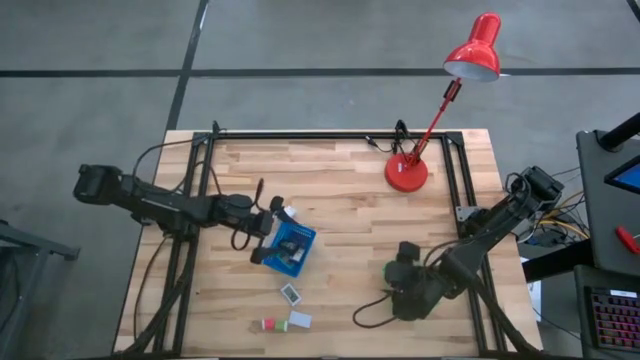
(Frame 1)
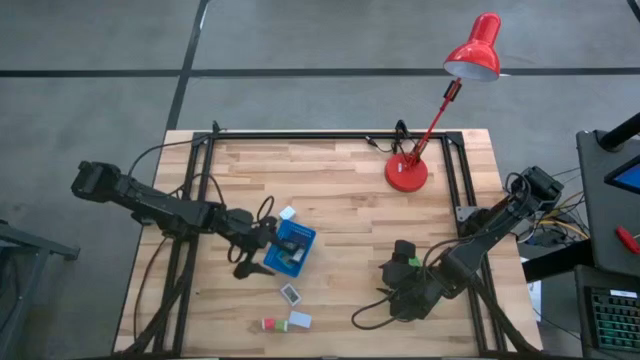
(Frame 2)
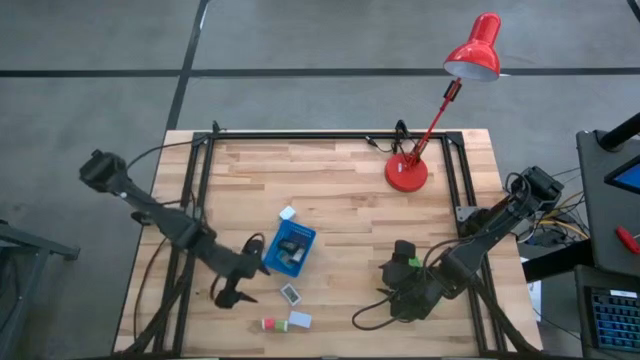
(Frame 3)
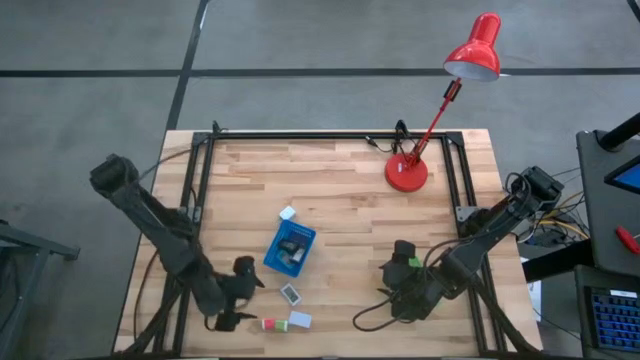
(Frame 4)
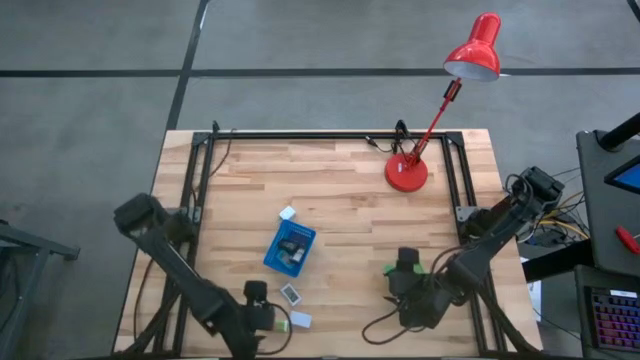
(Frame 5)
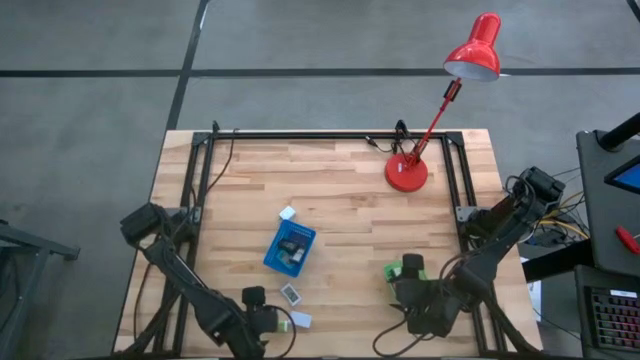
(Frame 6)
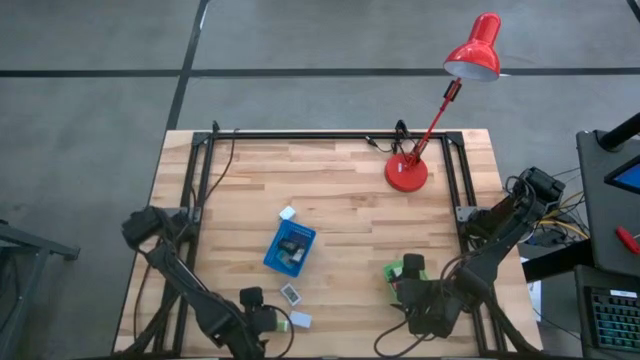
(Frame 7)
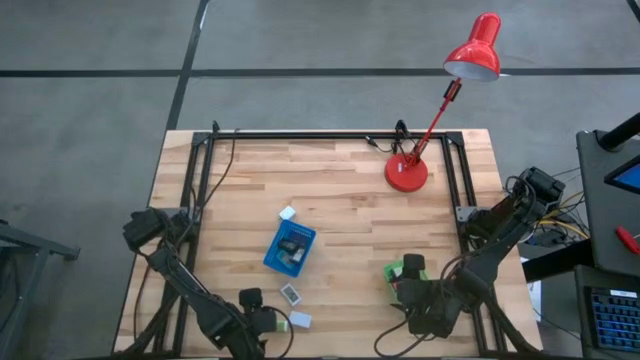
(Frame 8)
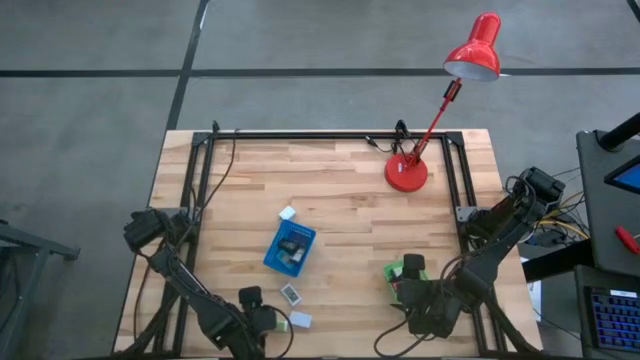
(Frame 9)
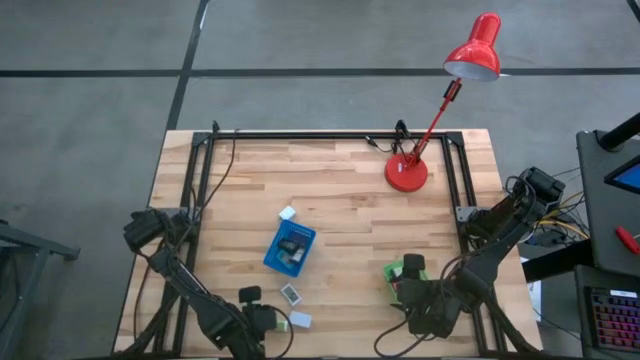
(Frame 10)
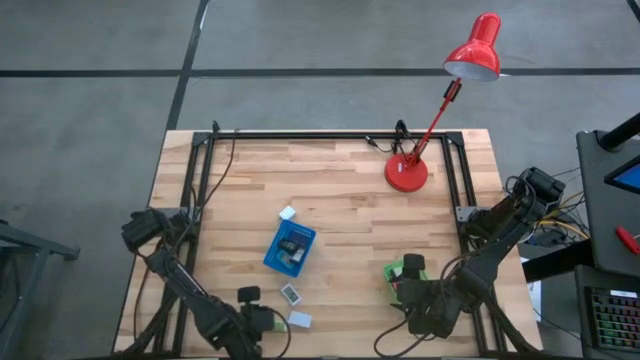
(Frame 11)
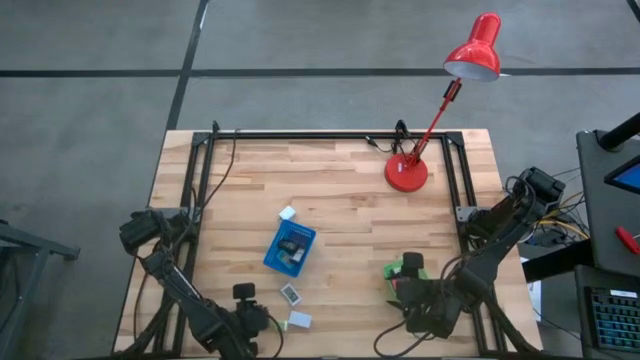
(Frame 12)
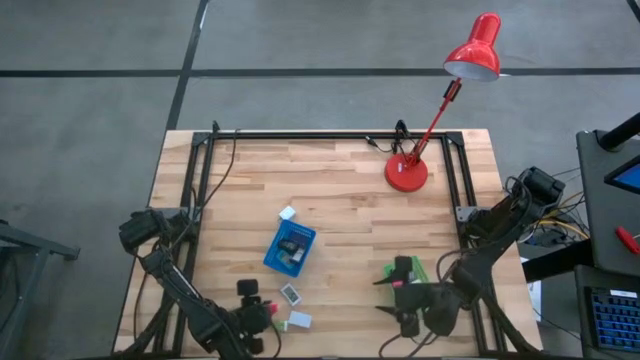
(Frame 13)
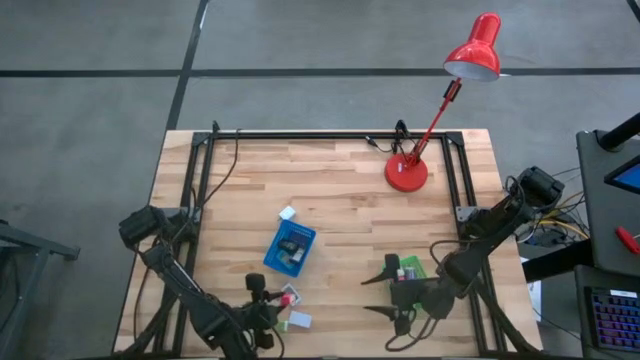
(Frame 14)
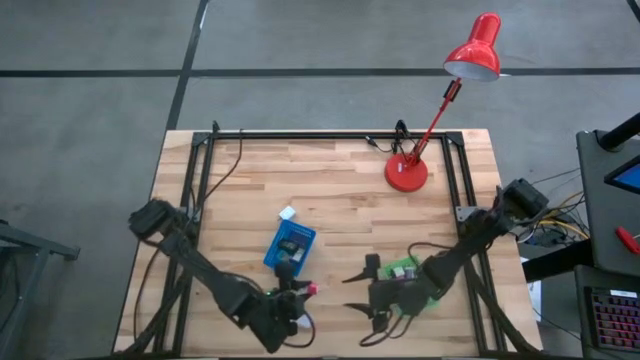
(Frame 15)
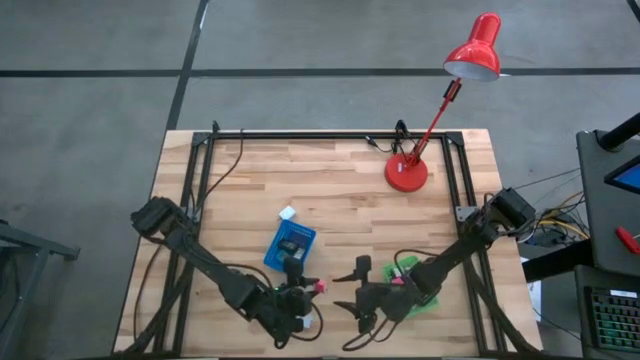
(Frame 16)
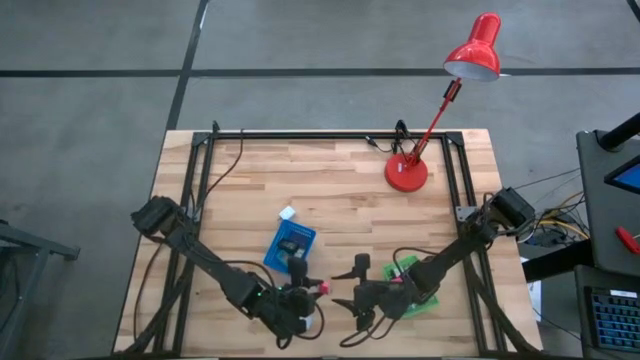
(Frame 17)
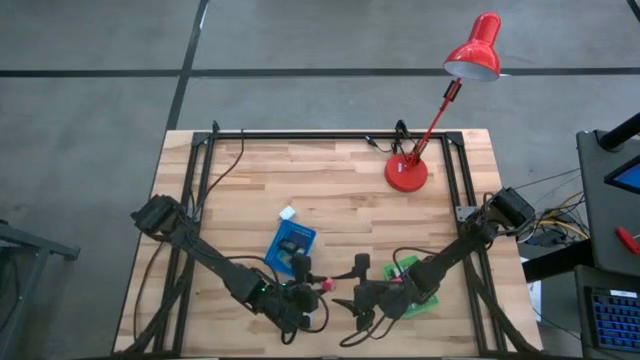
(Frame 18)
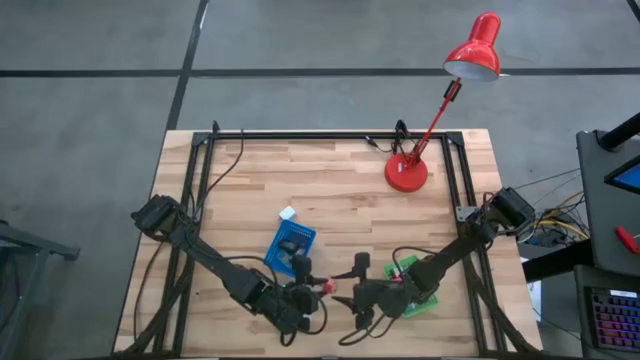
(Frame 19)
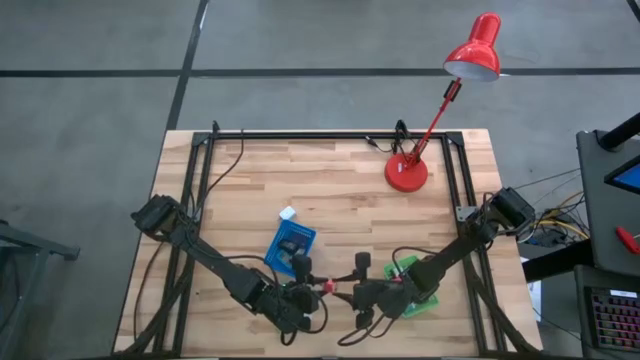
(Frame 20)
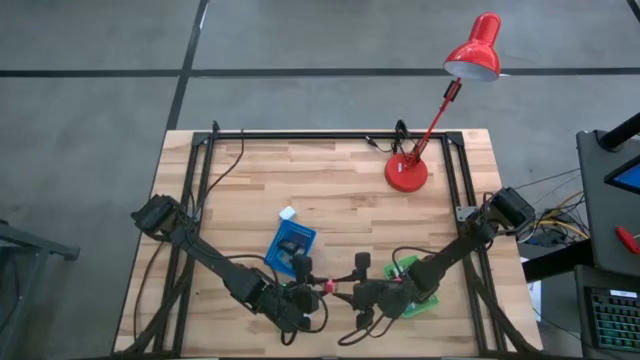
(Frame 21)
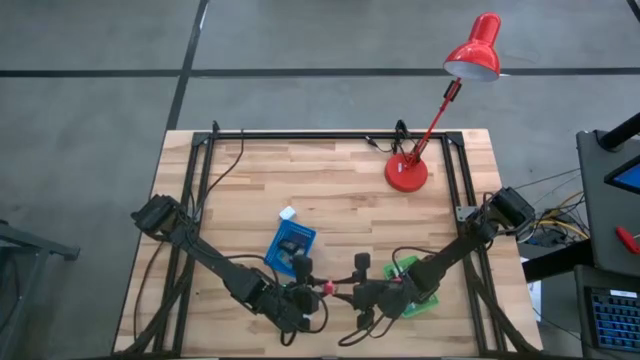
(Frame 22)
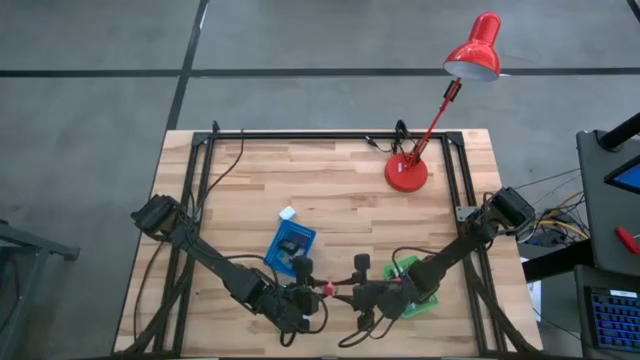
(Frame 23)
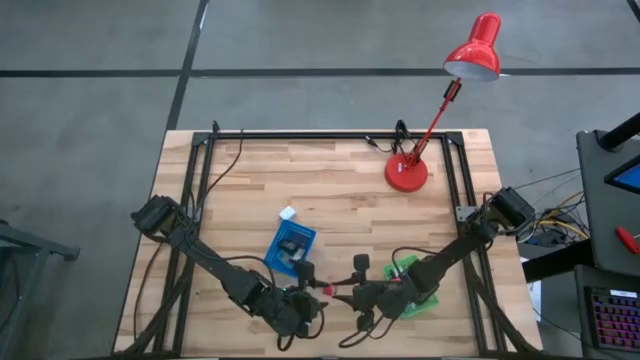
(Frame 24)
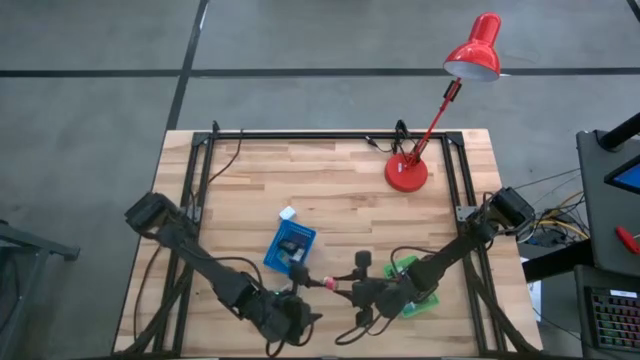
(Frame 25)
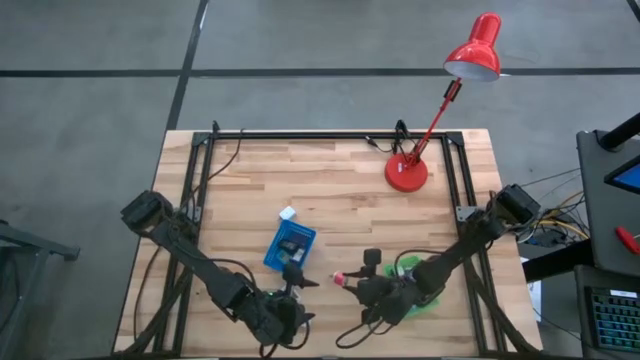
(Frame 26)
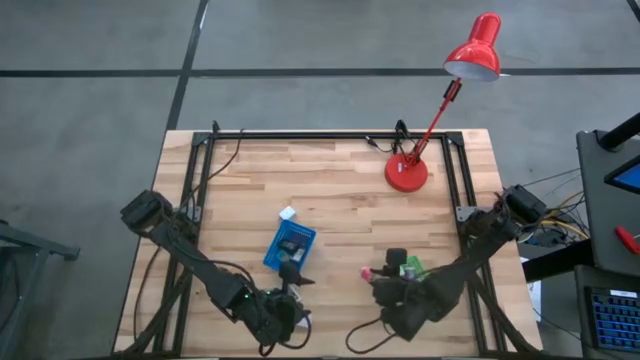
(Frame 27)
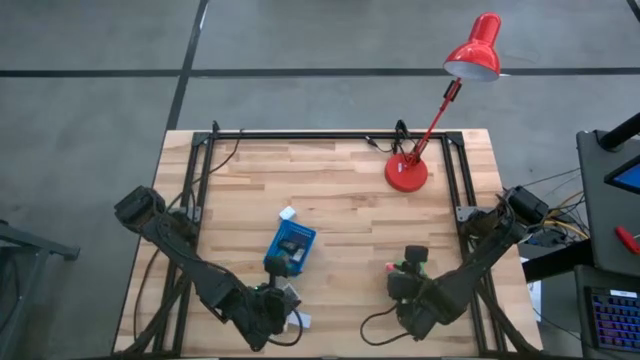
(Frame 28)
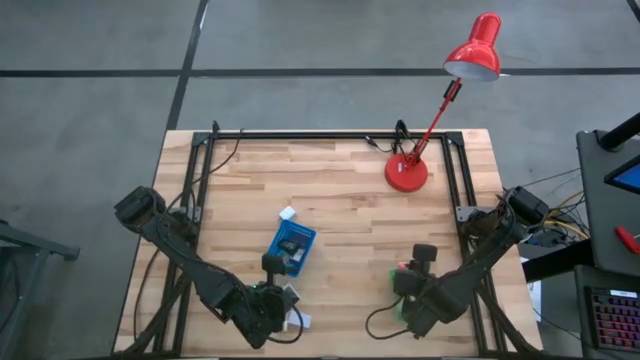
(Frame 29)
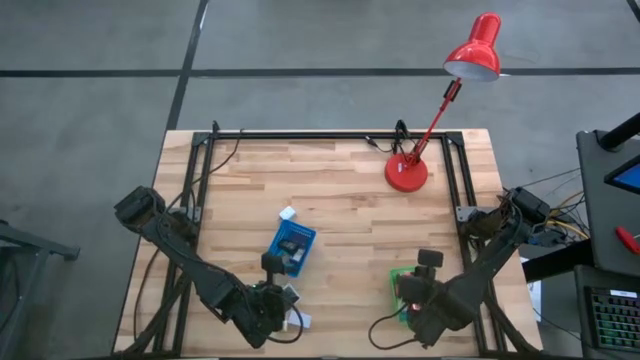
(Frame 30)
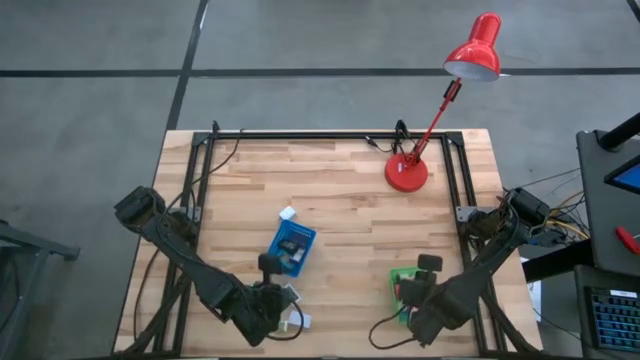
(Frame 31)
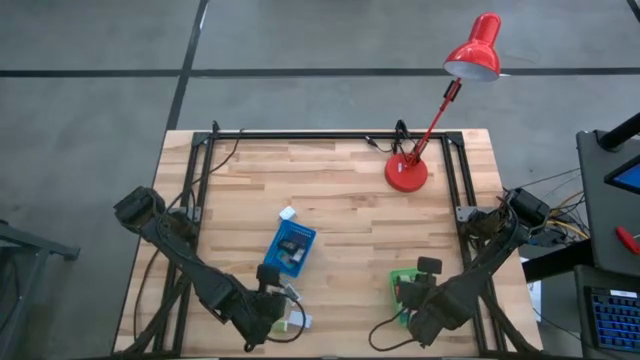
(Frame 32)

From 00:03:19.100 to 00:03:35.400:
Task: Pick & Place Office items
Put the pink white charger adapter into the green bin

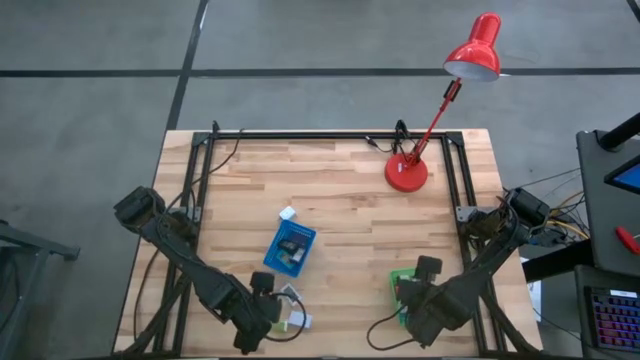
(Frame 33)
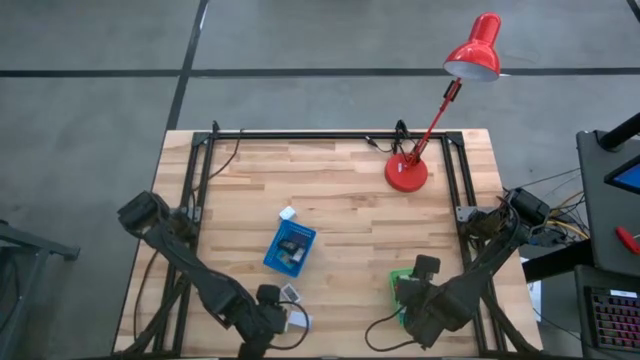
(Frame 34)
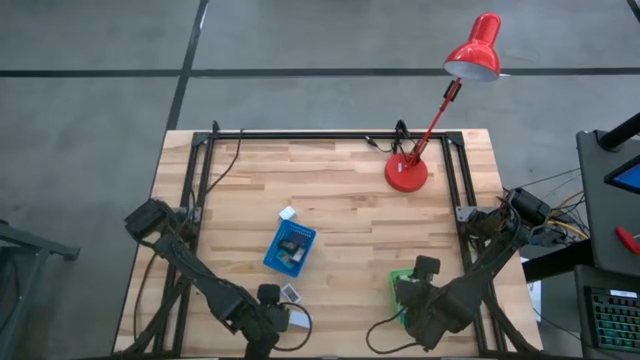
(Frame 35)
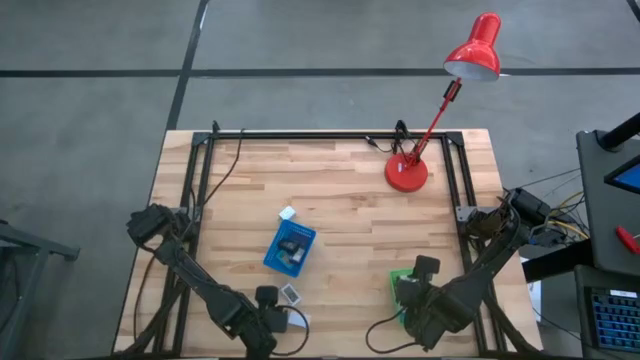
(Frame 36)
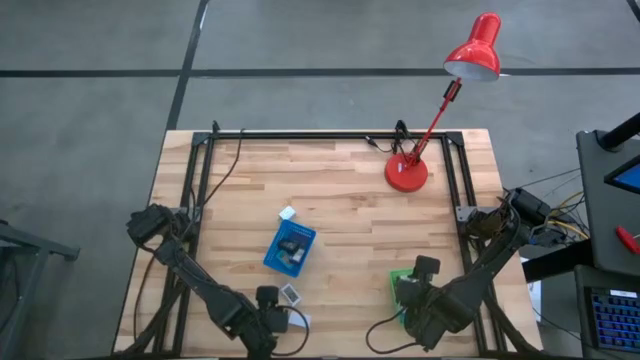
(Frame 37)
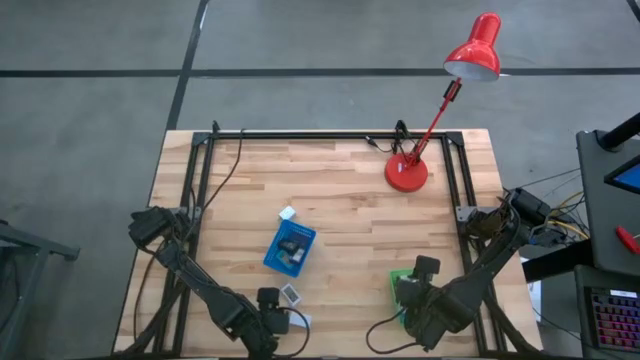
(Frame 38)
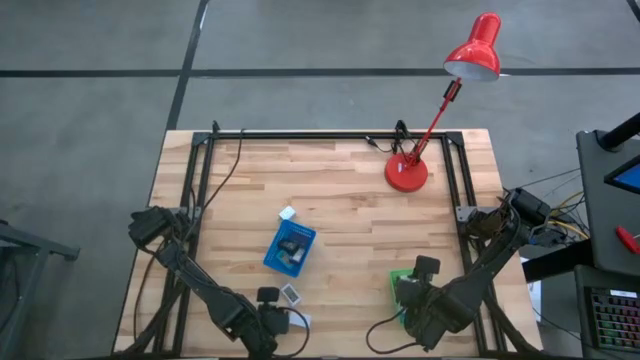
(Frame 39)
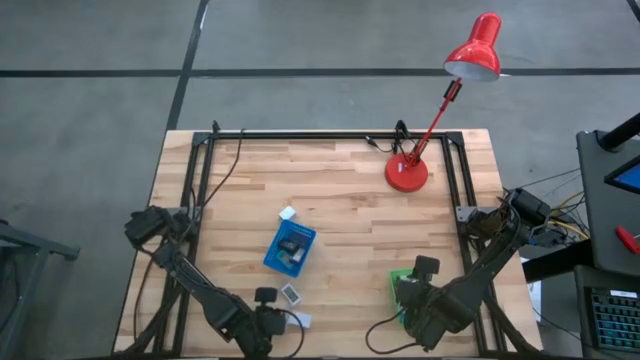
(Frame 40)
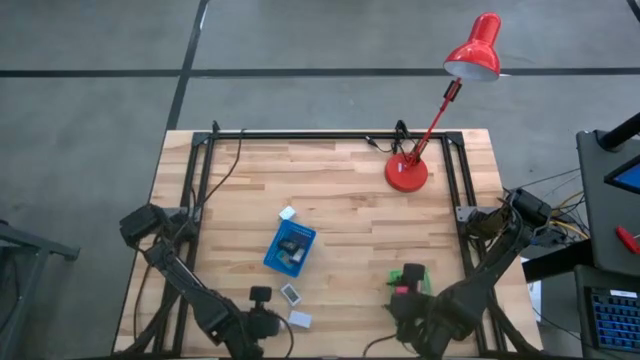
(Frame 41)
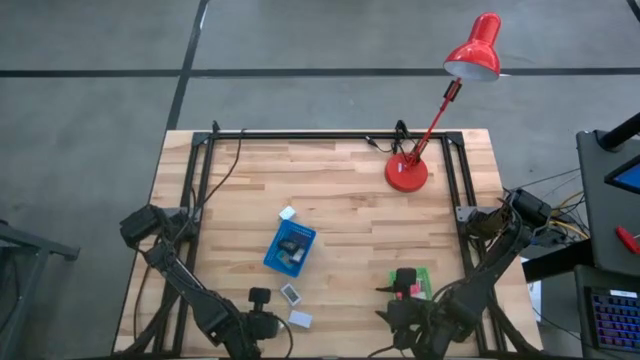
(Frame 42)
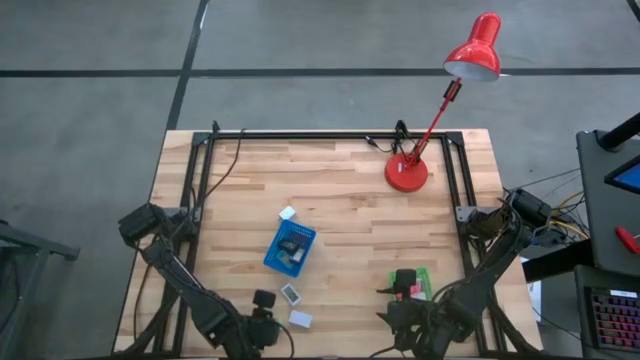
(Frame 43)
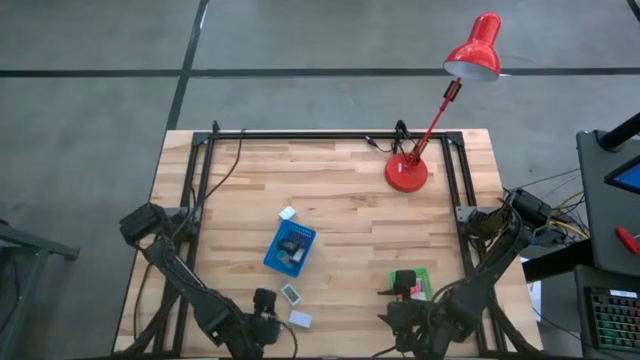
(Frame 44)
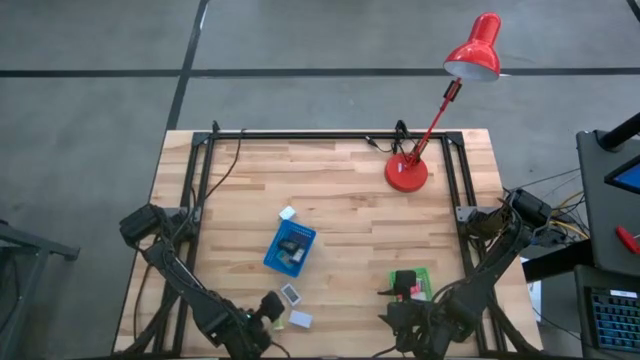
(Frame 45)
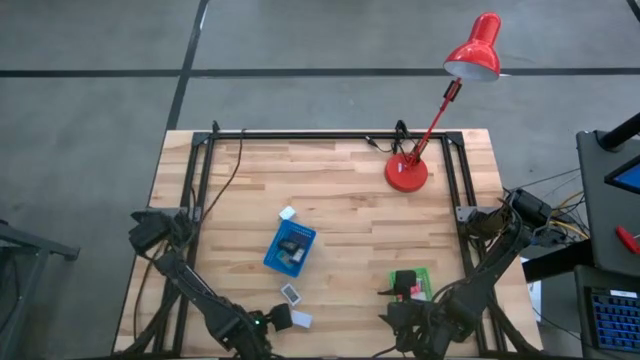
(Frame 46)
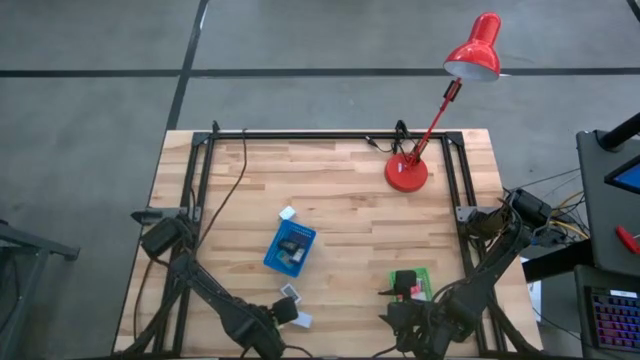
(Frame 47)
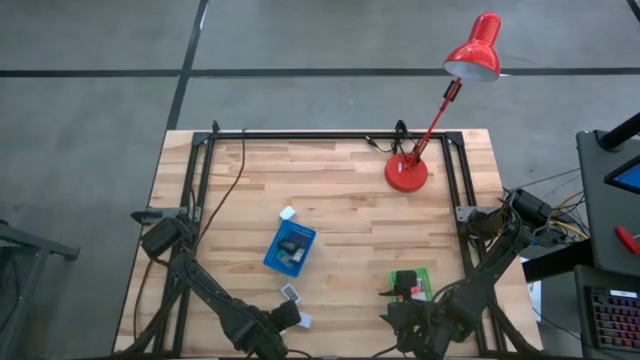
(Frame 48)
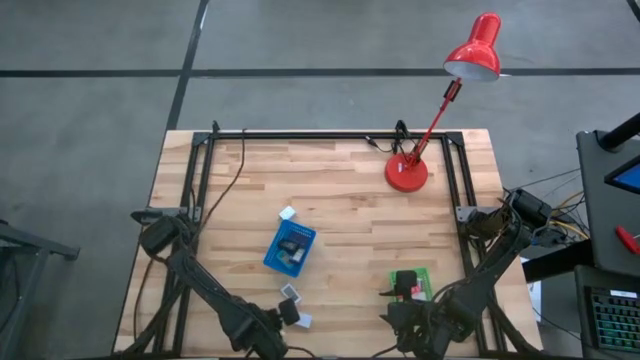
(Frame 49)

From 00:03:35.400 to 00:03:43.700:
Put the green charger adapter into the green bin
